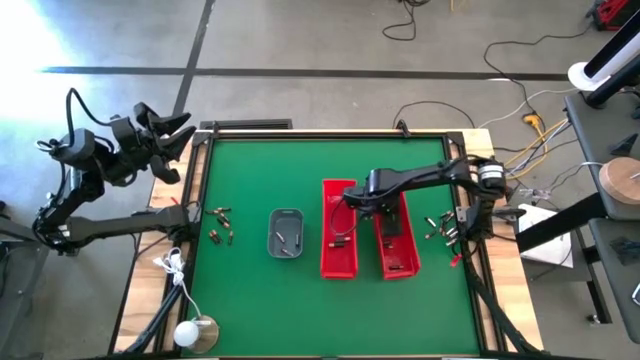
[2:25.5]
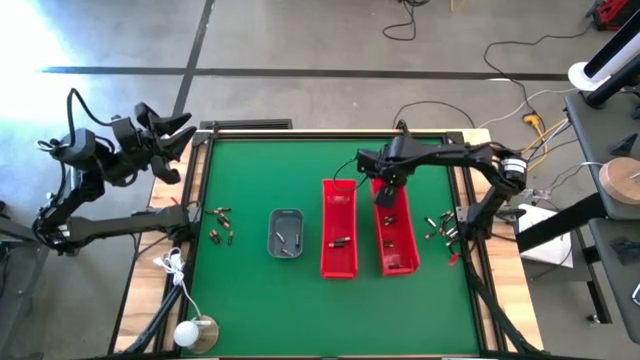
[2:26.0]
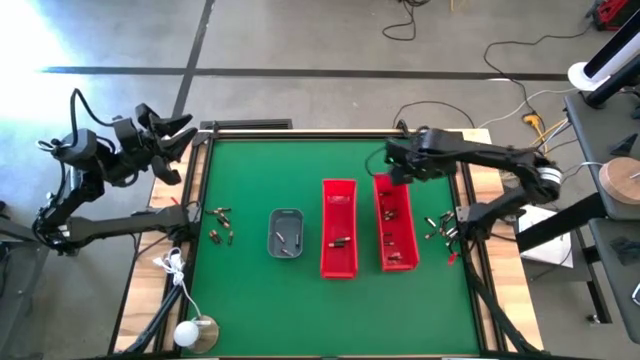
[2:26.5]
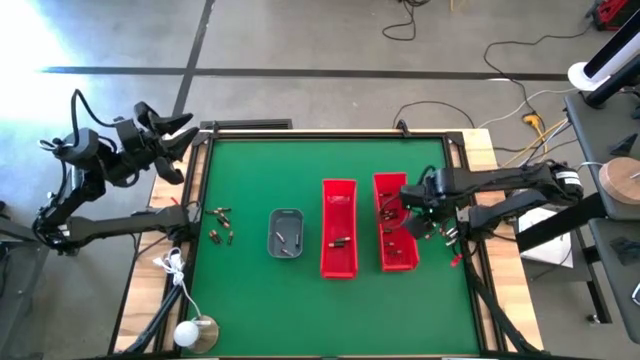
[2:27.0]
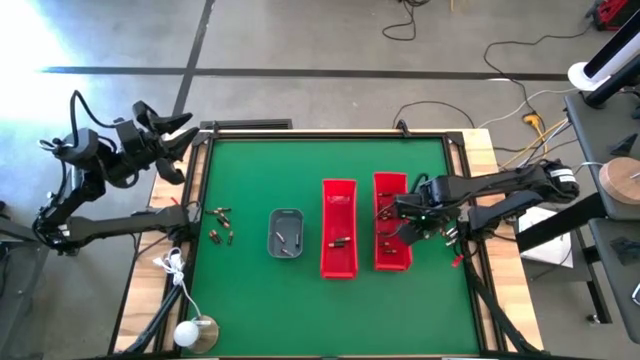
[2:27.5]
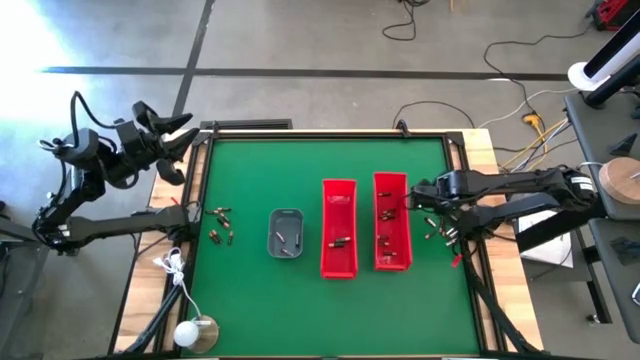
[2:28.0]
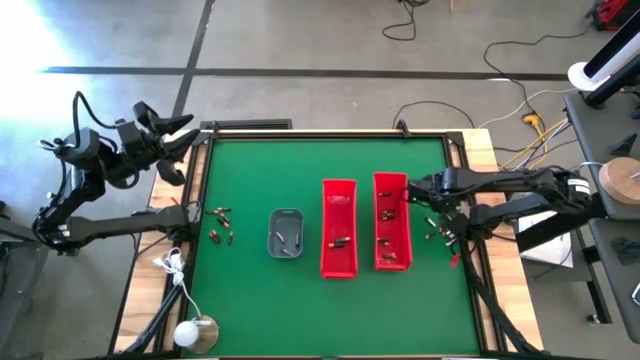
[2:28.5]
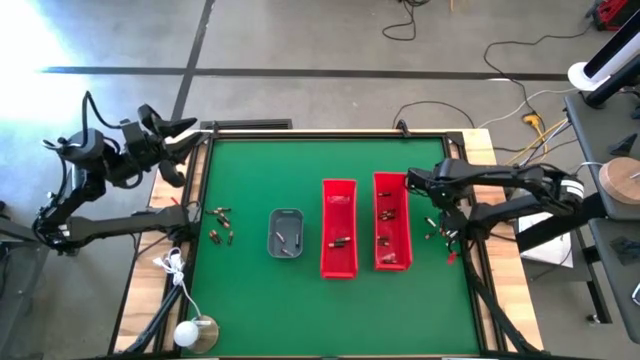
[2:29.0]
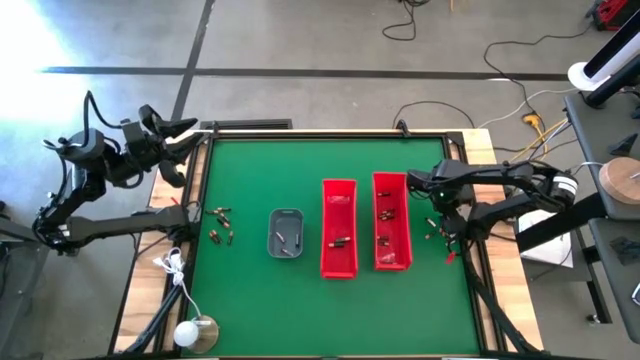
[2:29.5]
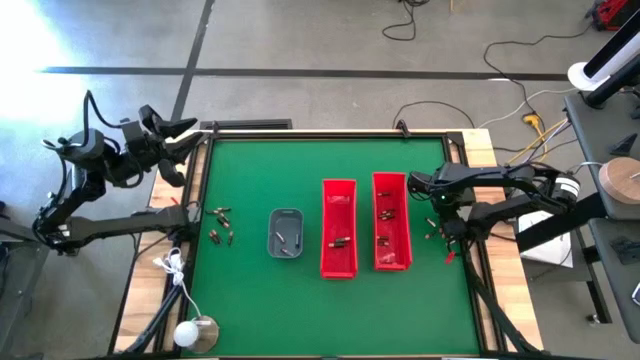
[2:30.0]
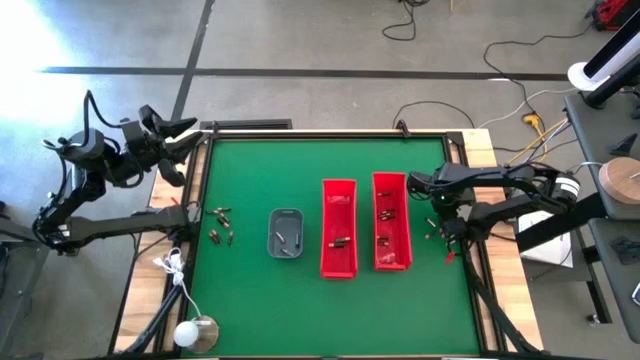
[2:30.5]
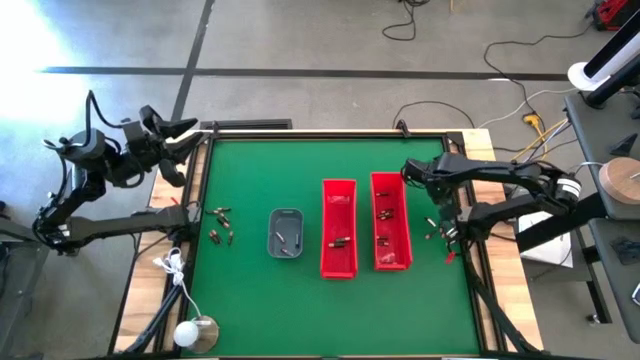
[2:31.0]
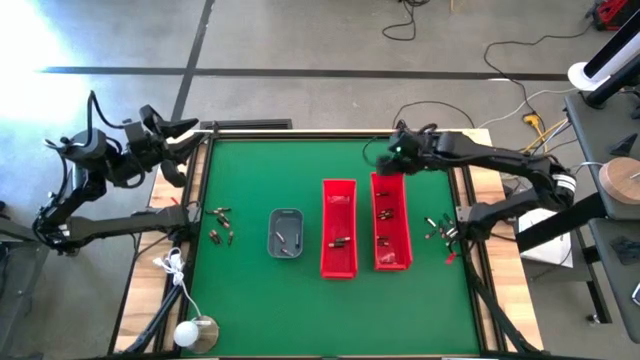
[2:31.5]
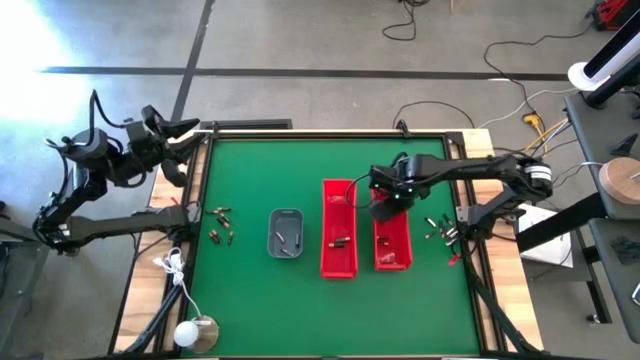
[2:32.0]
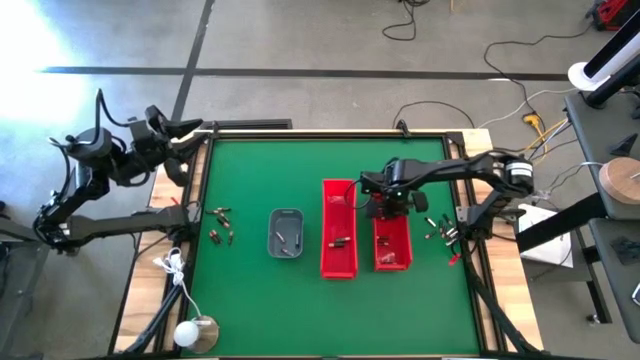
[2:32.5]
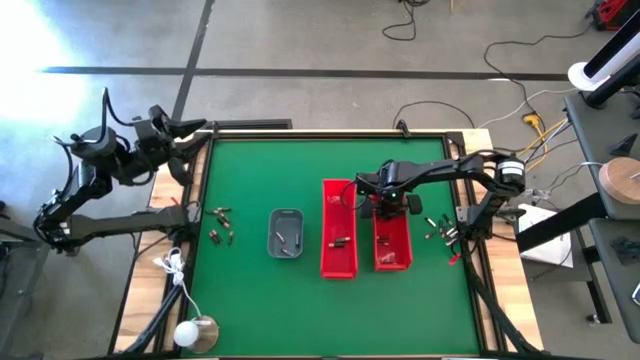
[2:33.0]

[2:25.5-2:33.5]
Task: Sort batteries
Put the small black battery into the right red bin

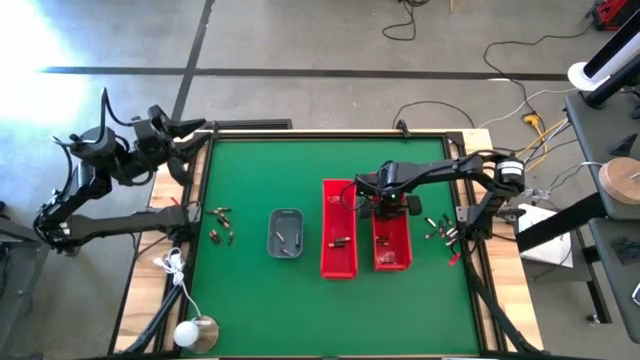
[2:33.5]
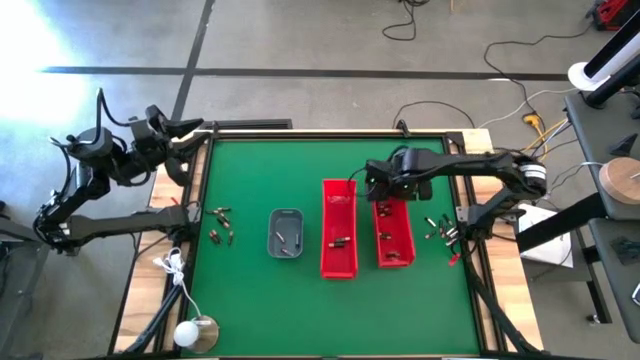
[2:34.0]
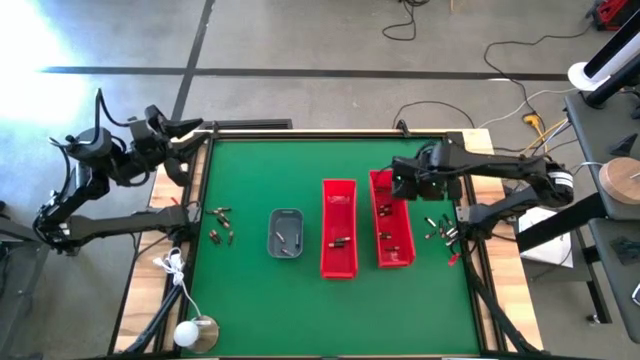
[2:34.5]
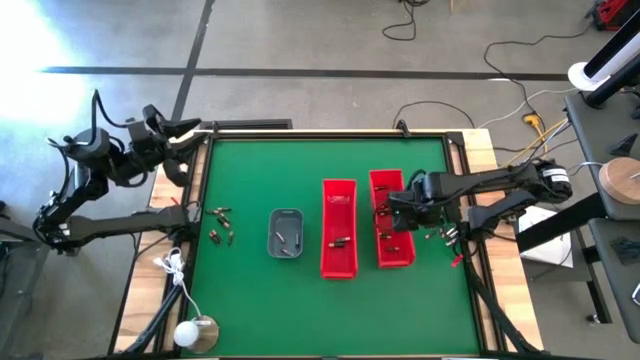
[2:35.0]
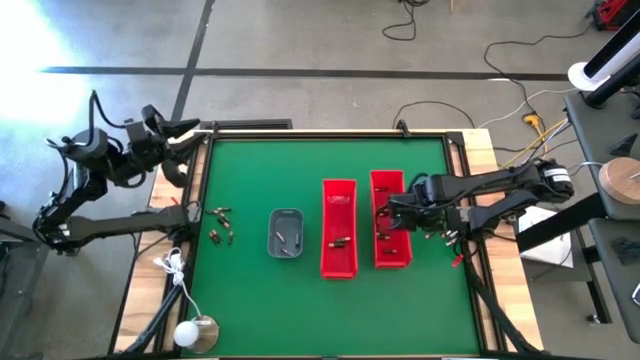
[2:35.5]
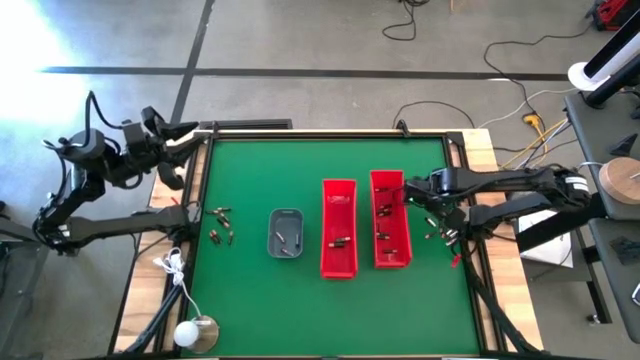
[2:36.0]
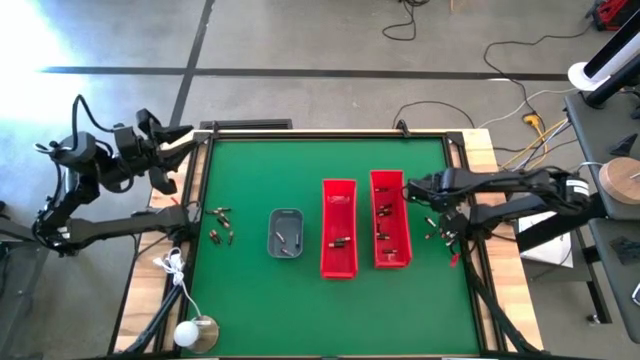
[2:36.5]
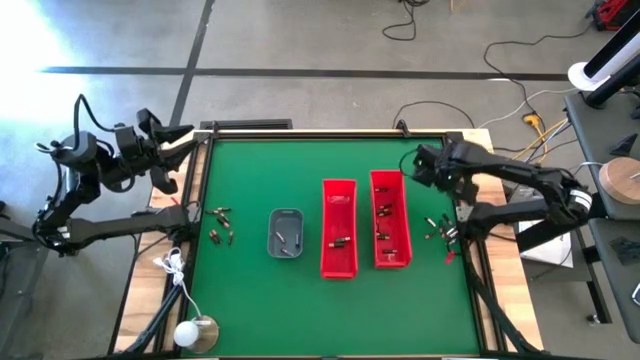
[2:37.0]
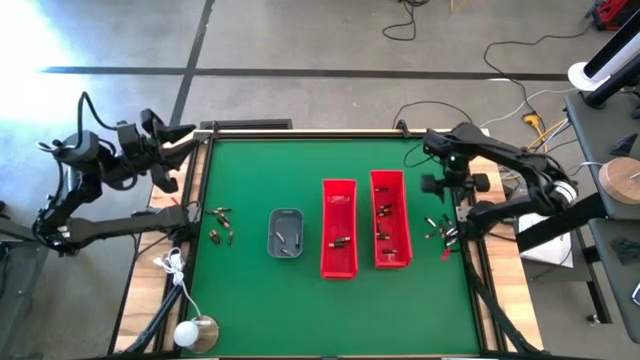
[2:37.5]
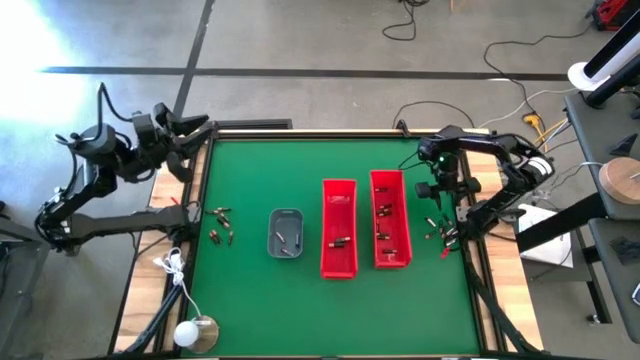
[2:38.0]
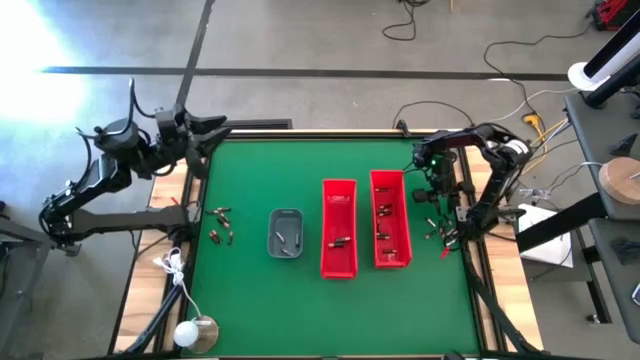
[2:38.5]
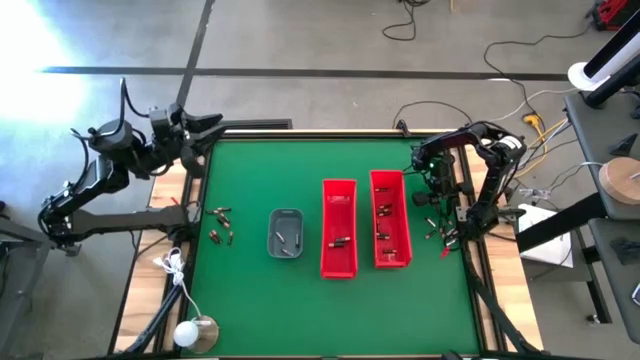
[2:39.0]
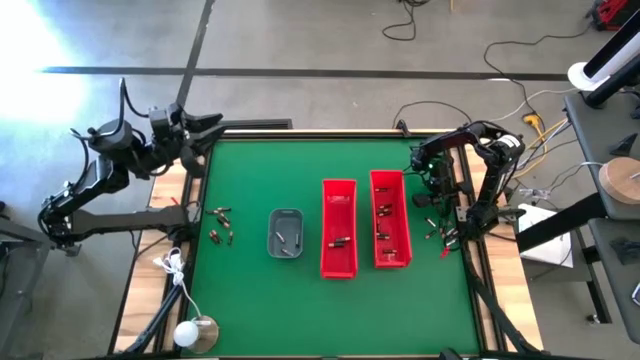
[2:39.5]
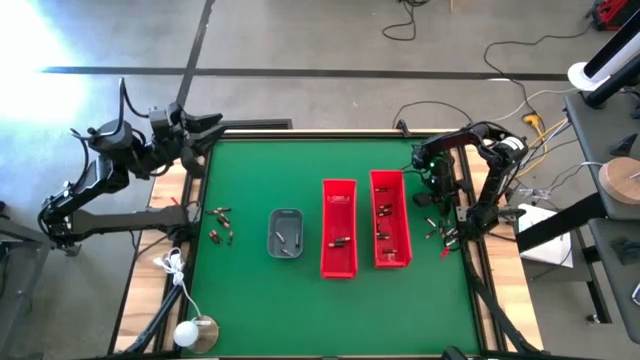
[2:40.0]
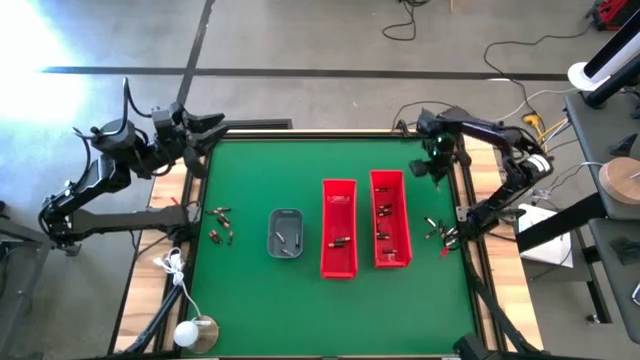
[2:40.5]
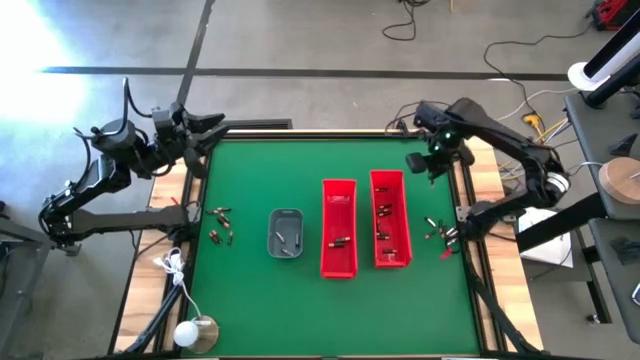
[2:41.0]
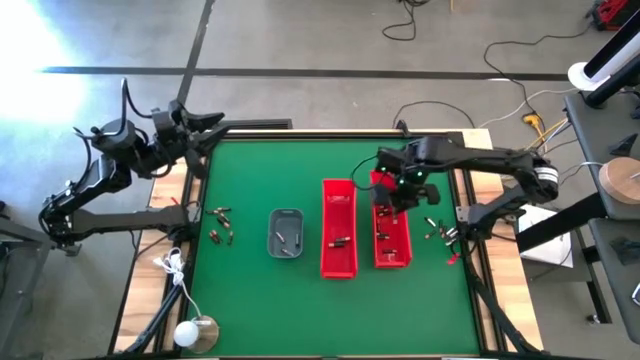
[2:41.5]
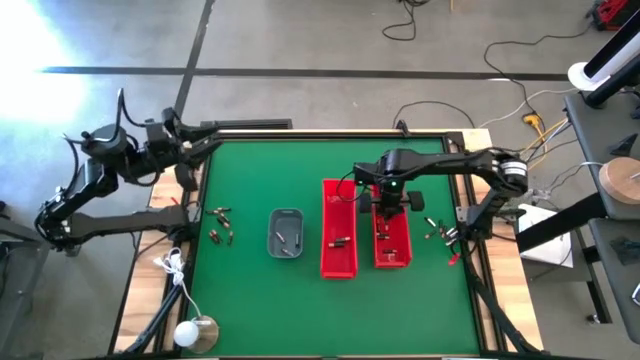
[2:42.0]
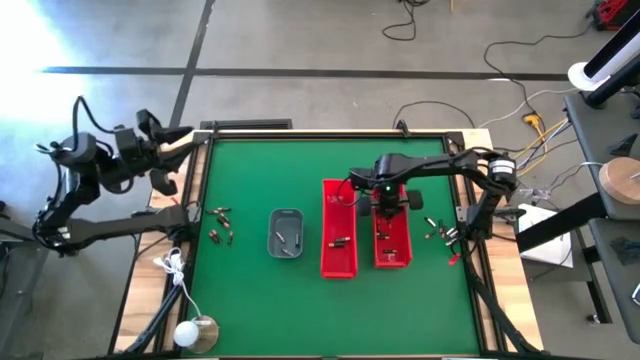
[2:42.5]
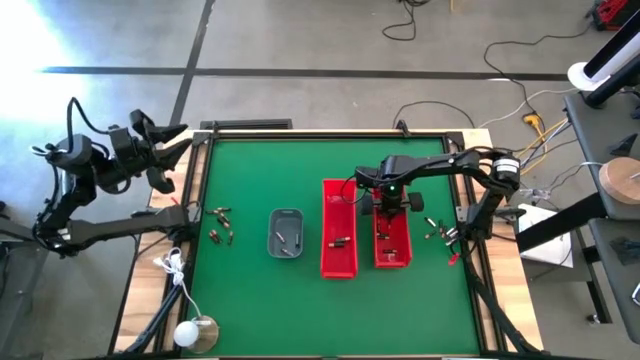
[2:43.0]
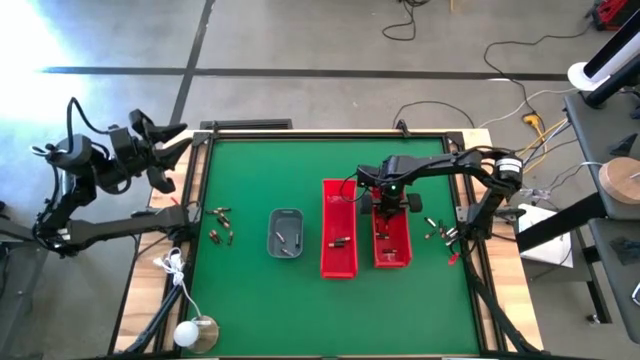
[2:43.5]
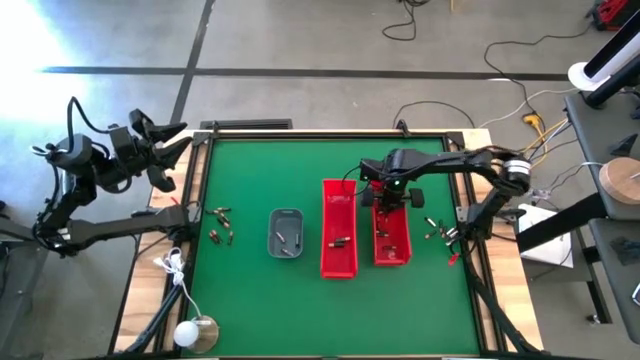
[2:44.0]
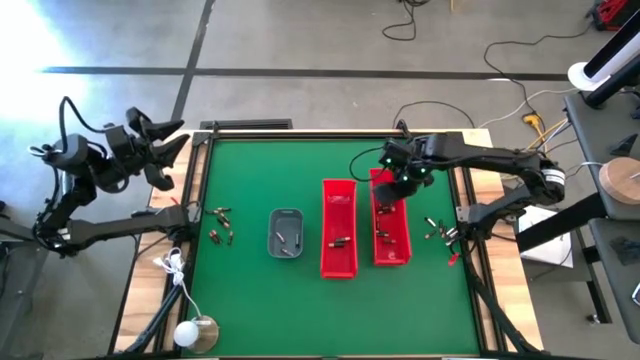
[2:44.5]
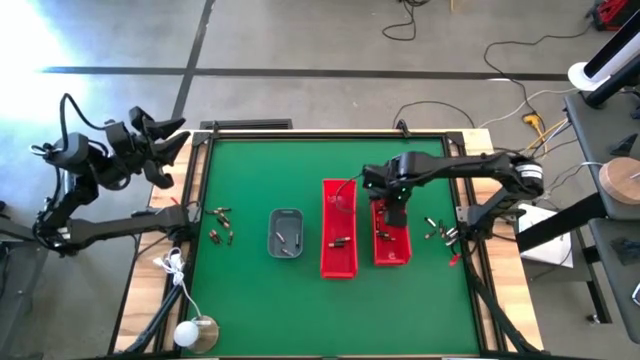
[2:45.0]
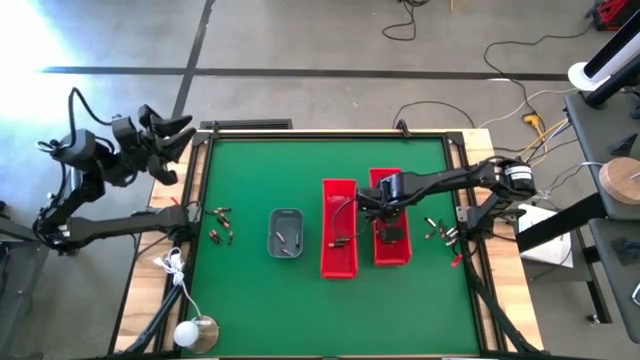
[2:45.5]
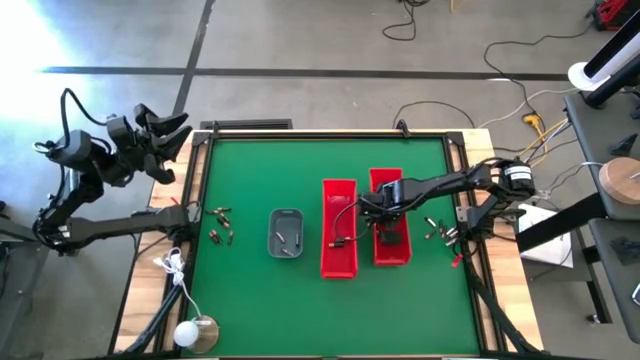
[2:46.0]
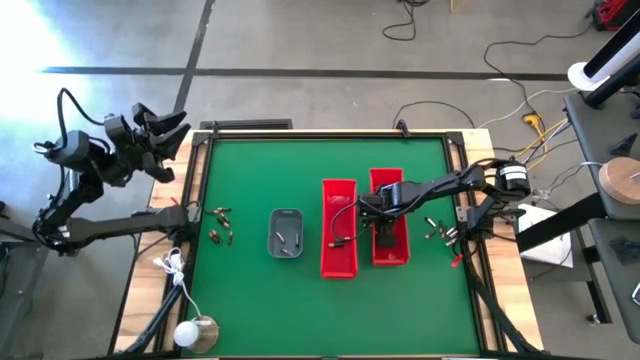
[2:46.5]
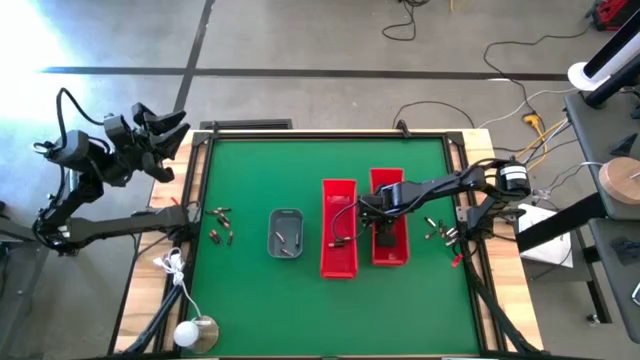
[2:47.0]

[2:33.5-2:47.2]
Put the small black battery into the right red bin
